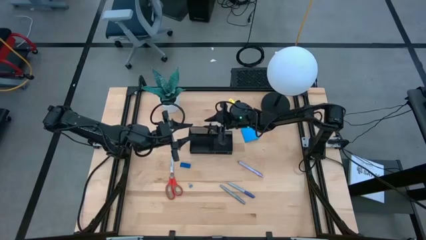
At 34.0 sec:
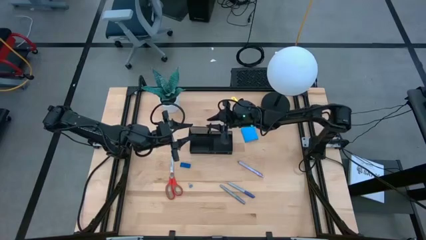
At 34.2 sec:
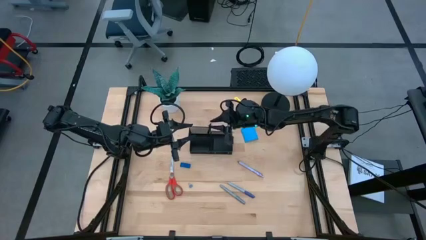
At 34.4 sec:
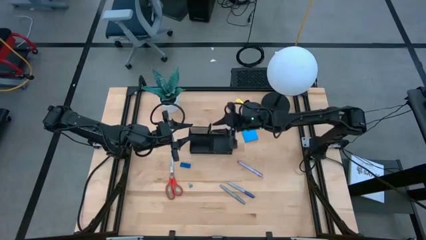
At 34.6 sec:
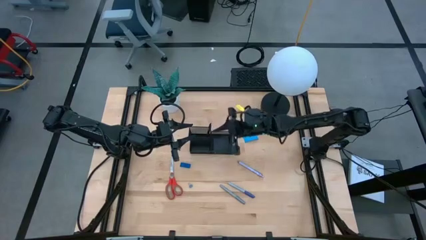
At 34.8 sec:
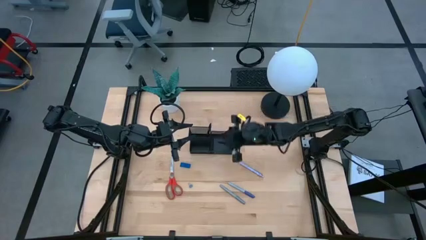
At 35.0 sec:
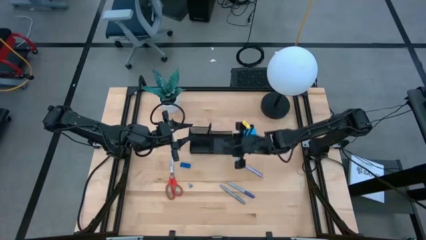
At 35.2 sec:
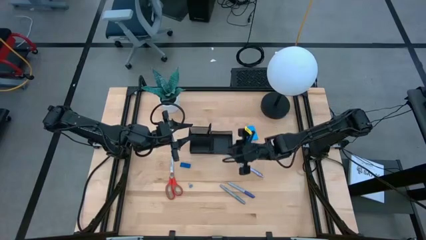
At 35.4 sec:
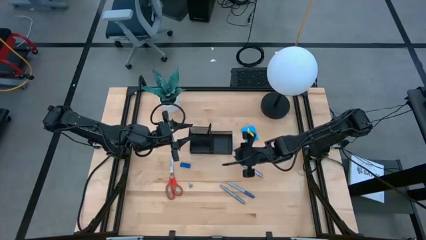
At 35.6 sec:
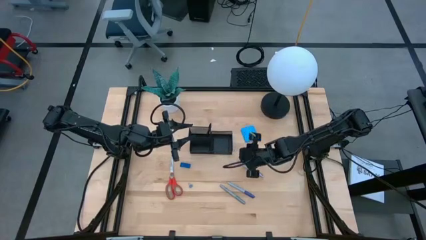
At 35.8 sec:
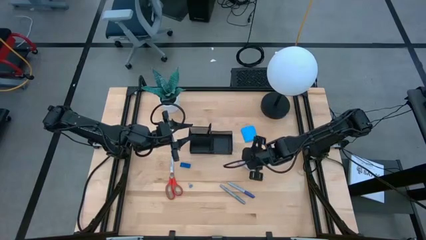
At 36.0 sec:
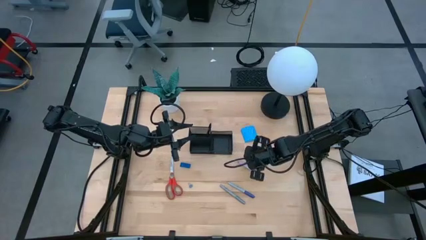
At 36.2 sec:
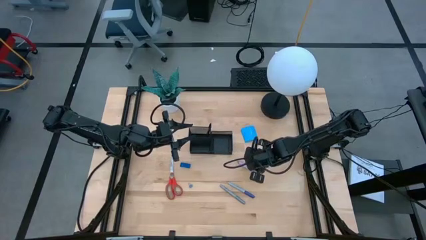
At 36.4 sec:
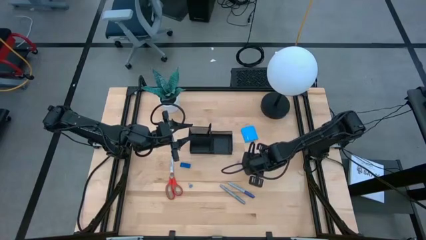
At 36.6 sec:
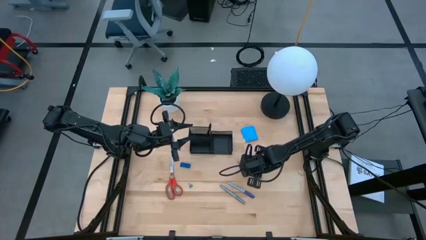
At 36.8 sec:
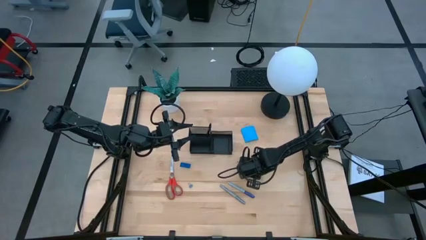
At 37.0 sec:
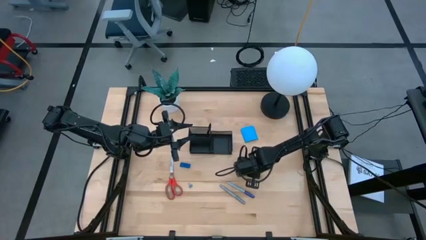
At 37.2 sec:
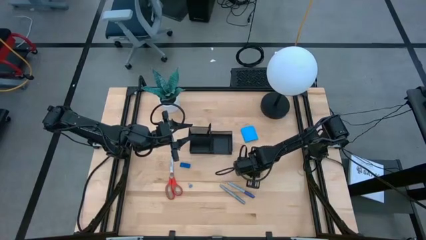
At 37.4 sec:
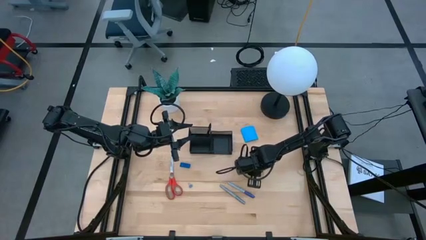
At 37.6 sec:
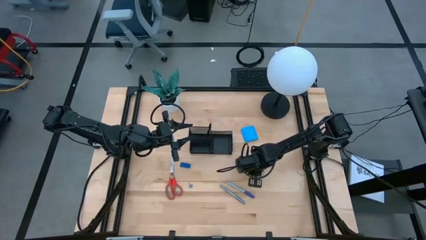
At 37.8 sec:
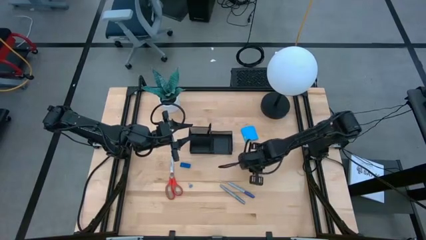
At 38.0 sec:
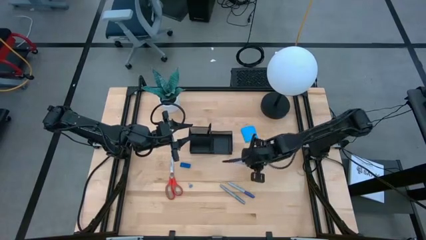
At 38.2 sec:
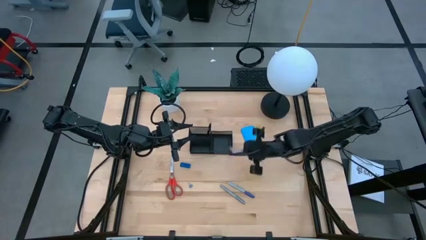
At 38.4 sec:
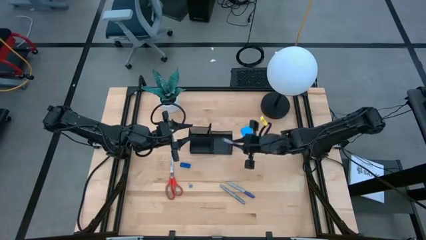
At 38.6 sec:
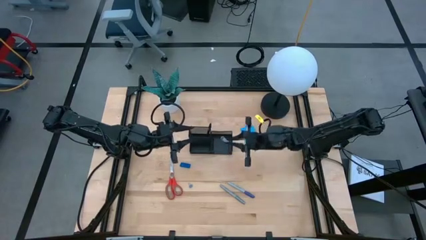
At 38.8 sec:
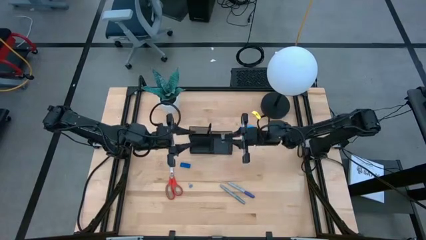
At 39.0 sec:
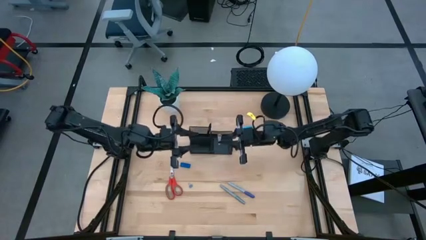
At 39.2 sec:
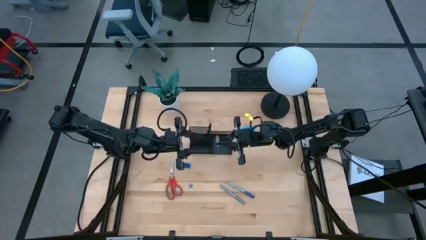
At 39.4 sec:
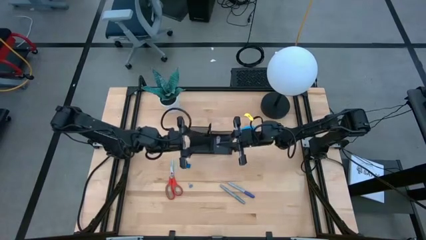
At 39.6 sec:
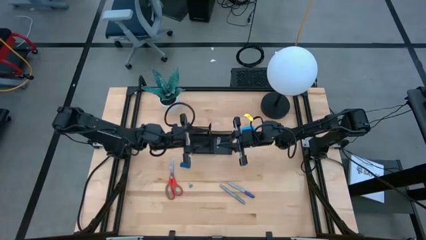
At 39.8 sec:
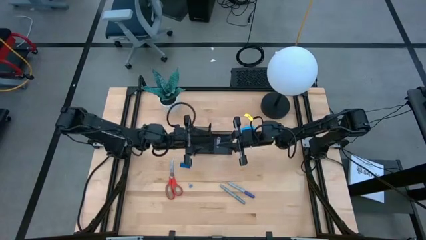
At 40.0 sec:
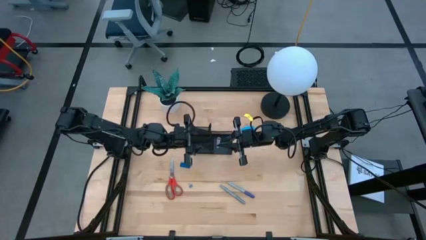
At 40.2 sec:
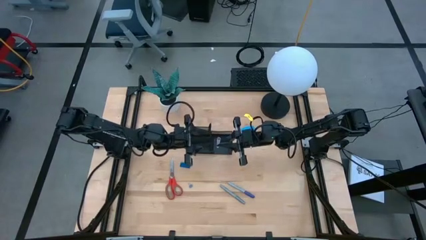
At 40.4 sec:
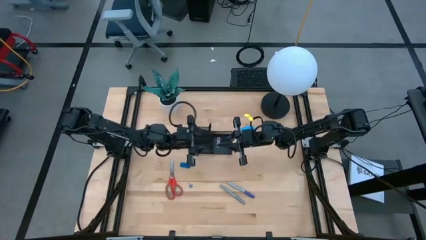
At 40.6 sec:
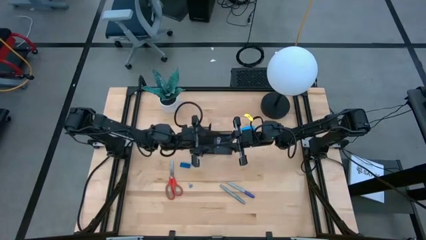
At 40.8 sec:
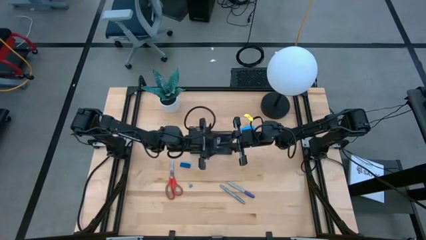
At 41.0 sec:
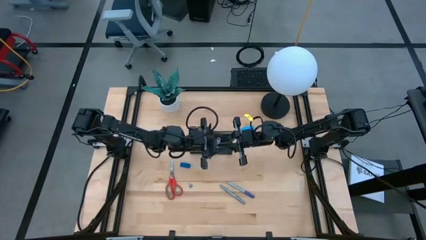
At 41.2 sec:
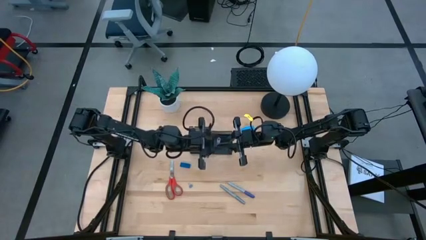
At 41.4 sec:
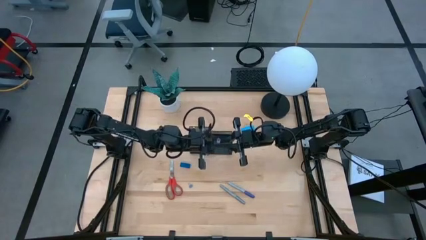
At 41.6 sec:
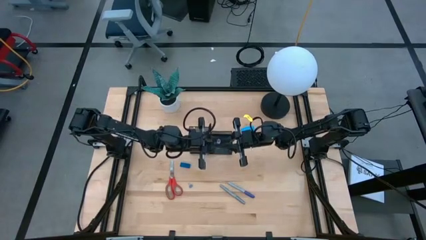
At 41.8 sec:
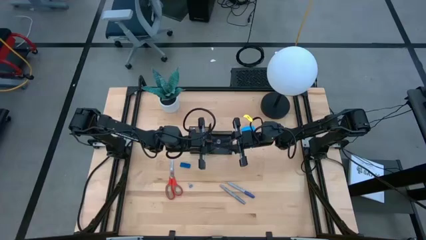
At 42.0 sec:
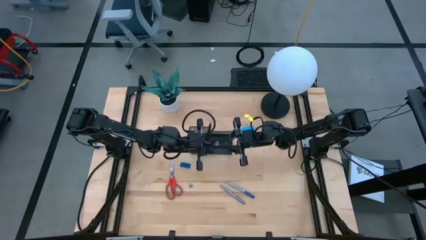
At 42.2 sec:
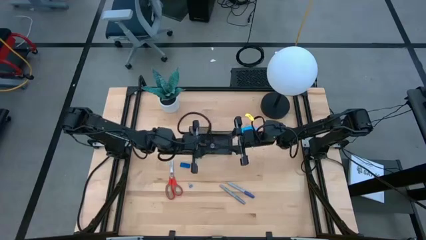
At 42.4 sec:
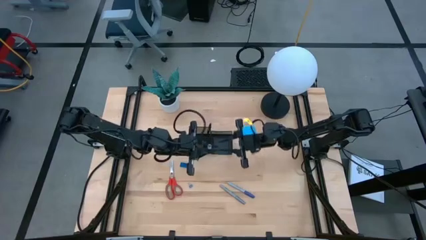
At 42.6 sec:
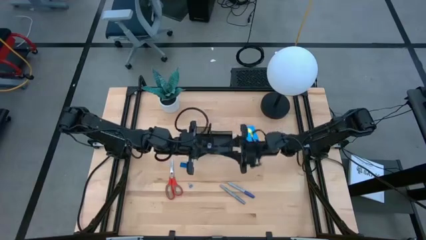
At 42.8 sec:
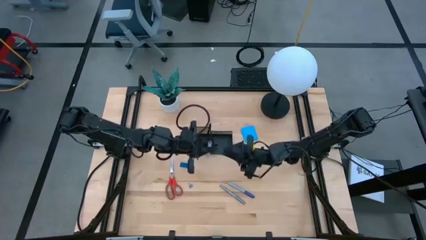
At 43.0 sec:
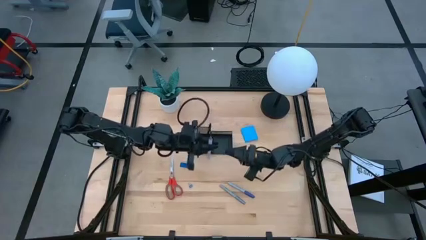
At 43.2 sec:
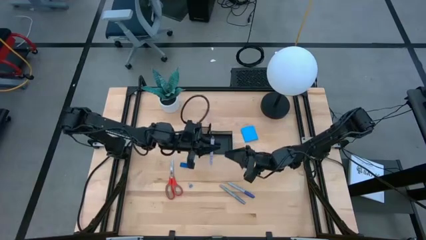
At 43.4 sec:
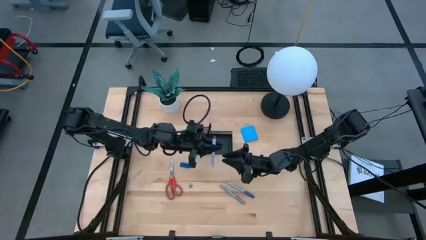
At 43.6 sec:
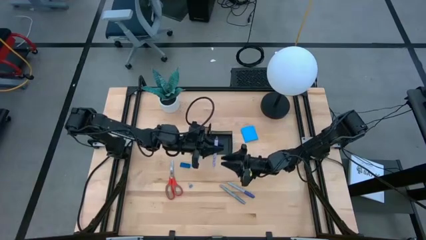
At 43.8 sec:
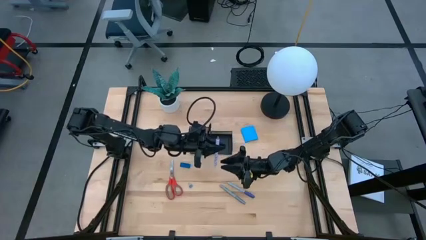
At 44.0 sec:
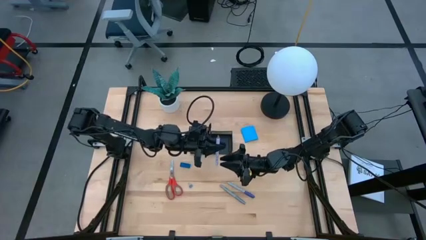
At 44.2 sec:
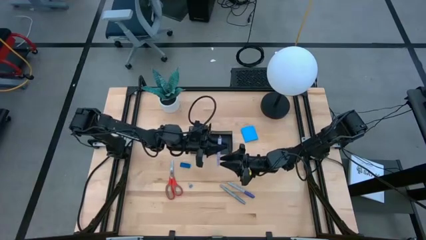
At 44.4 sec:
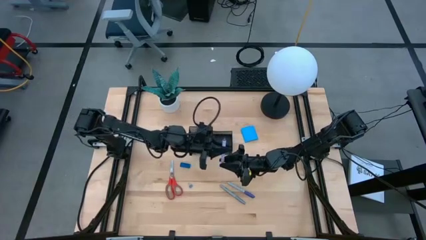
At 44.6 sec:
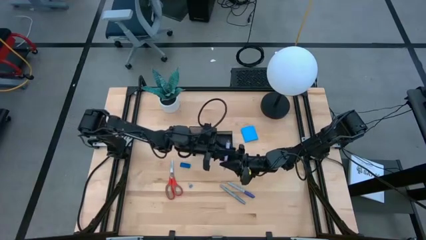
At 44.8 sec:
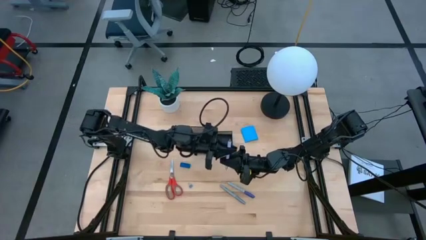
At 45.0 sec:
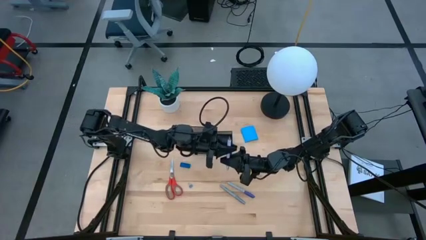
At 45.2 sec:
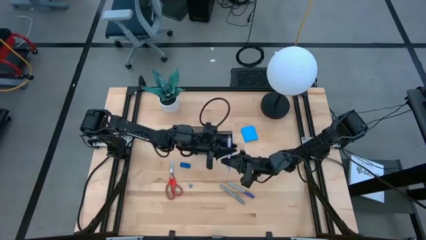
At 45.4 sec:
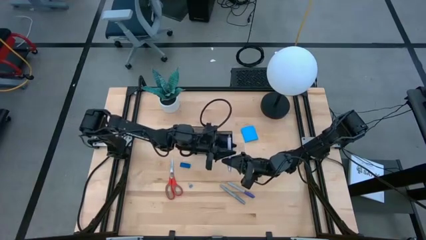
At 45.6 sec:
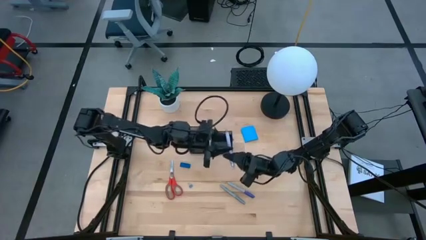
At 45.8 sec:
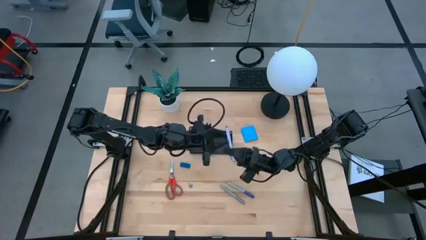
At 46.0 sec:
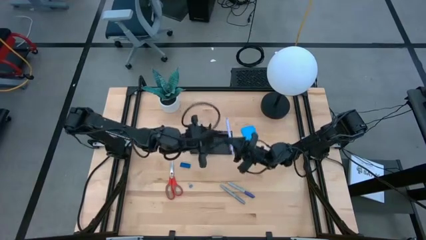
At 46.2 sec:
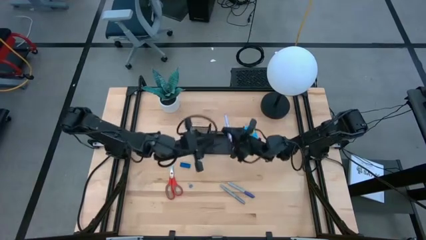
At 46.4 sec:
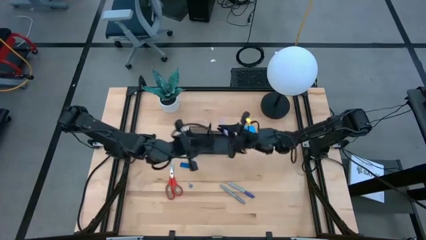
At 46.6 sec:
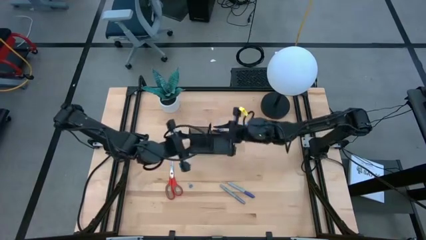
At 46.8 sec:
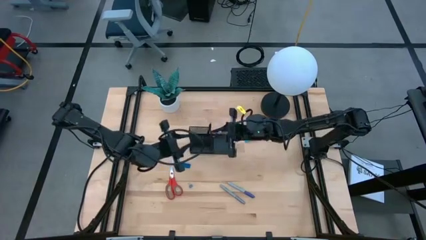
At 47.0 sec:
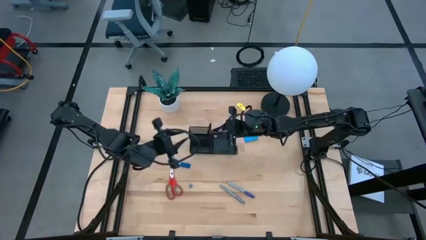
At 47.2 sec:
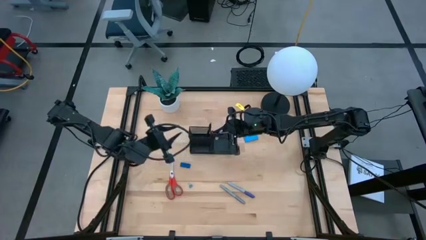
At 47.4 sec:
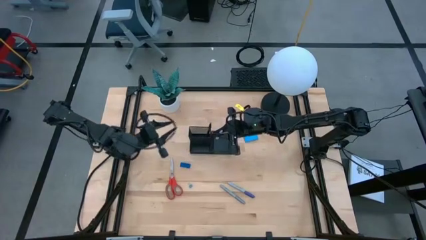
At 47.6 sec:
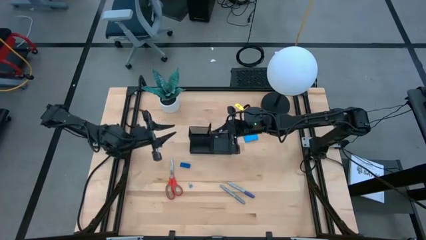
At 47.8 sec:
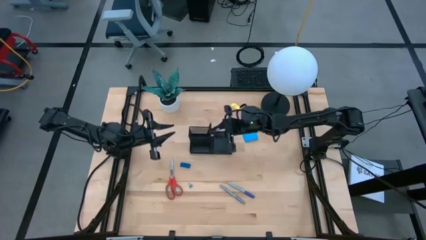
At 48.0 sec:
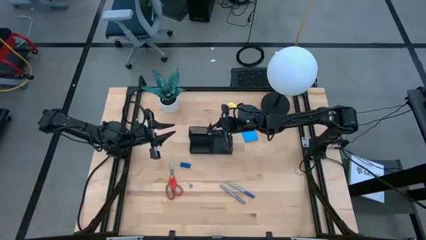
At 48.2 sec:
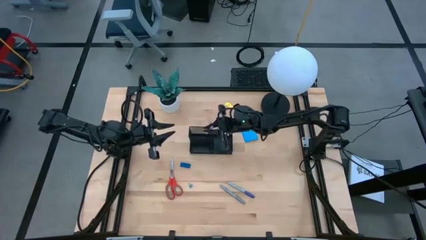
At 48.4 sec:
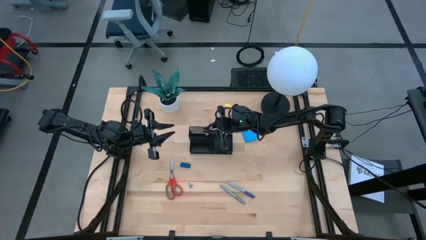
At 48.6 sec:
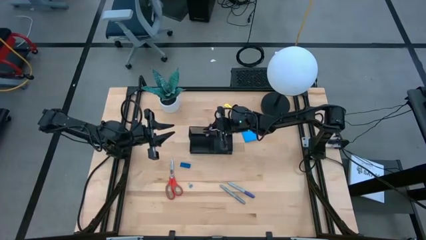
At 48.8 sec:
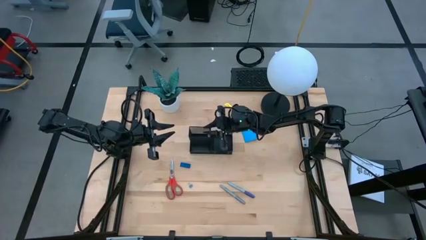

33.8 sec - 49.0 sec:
Task: Pick and place office supplies into organizer
Put the purple pen into the black desk organizer
